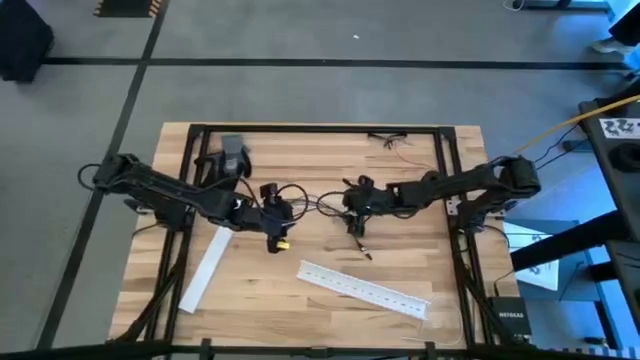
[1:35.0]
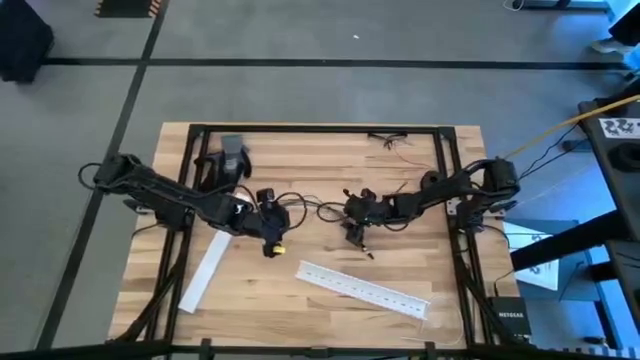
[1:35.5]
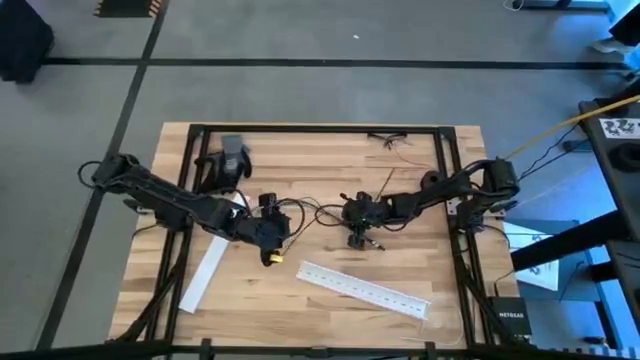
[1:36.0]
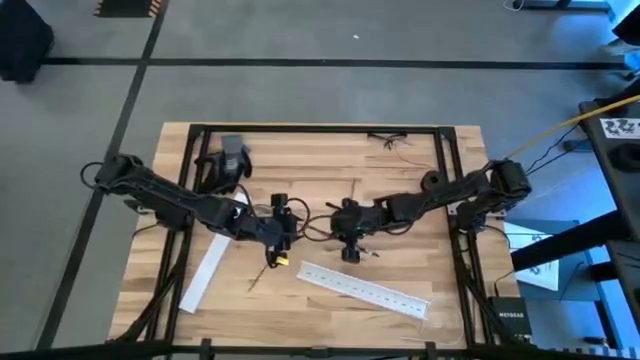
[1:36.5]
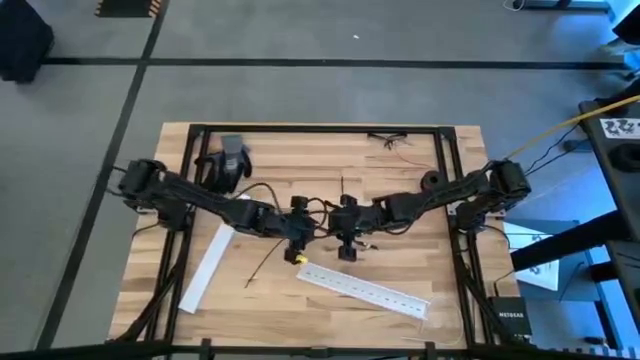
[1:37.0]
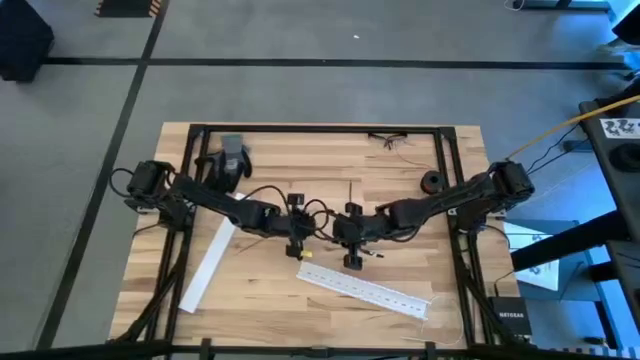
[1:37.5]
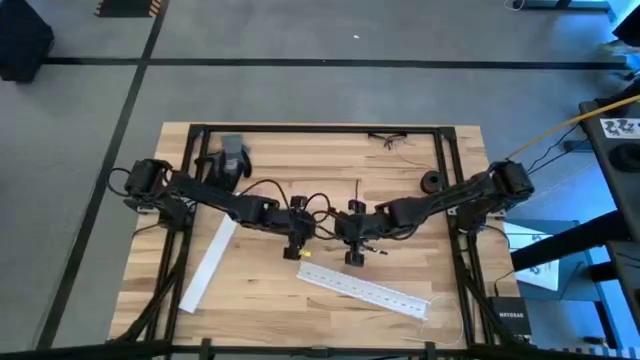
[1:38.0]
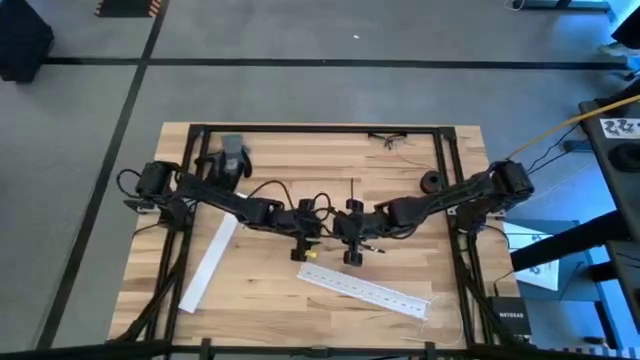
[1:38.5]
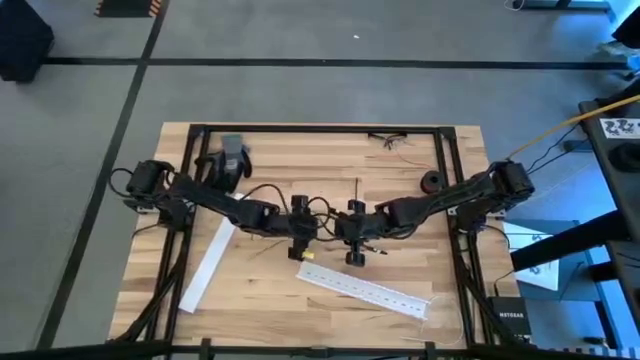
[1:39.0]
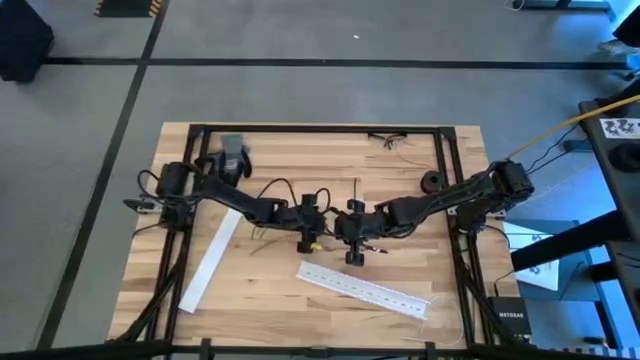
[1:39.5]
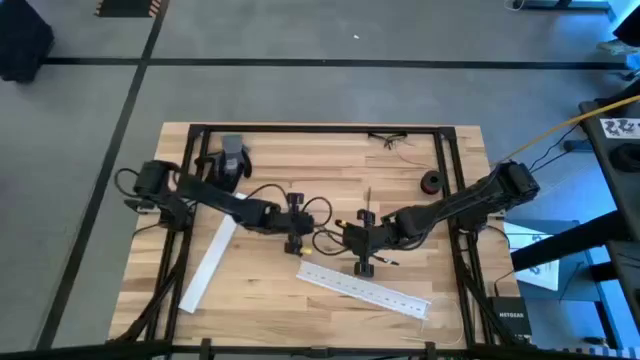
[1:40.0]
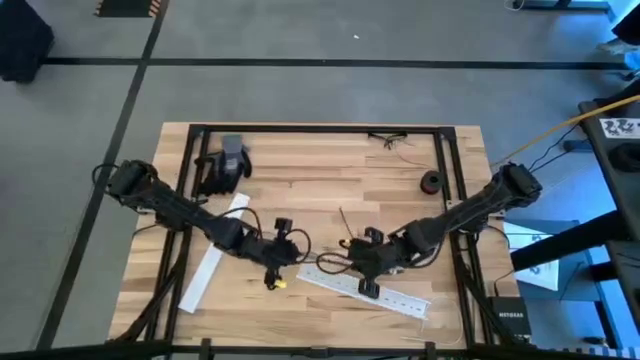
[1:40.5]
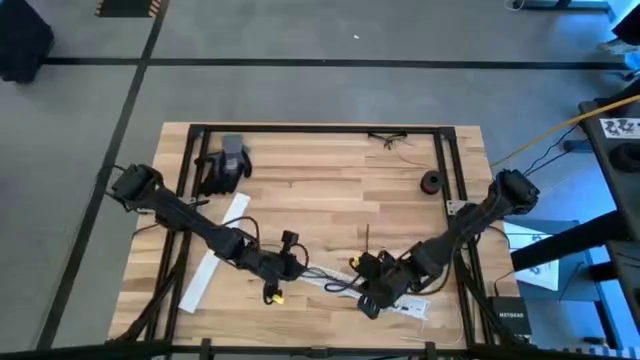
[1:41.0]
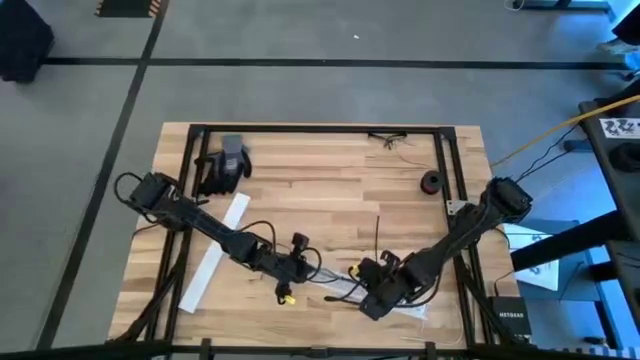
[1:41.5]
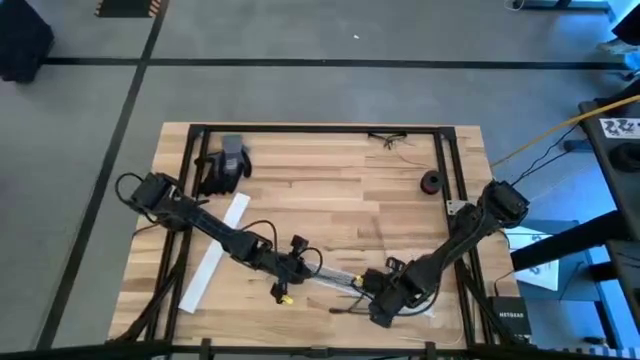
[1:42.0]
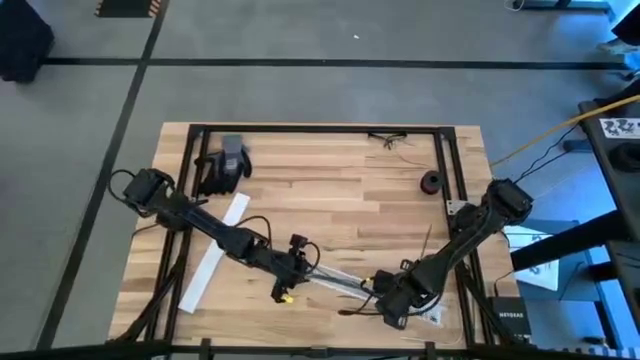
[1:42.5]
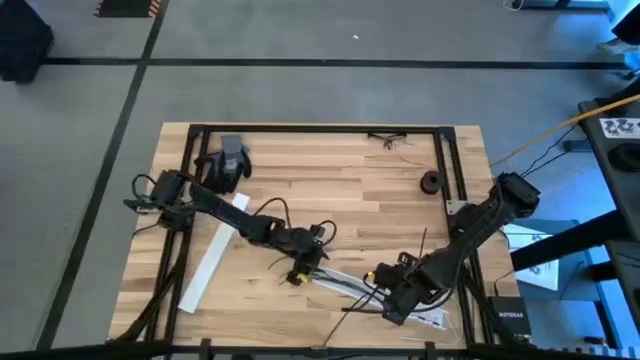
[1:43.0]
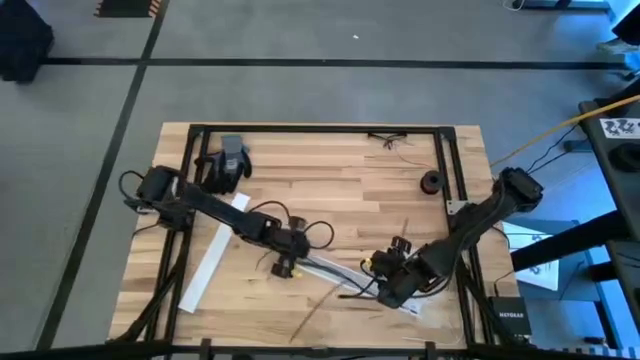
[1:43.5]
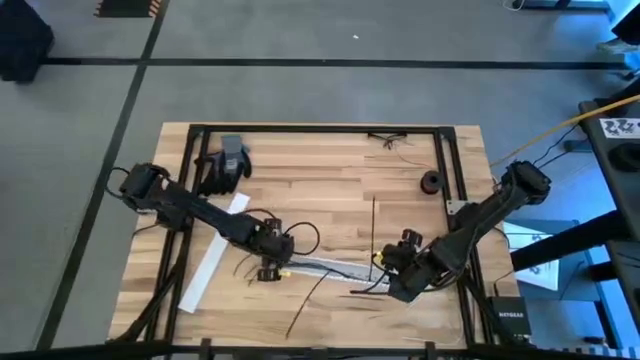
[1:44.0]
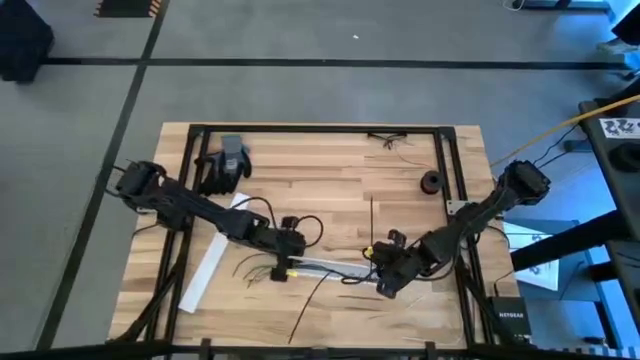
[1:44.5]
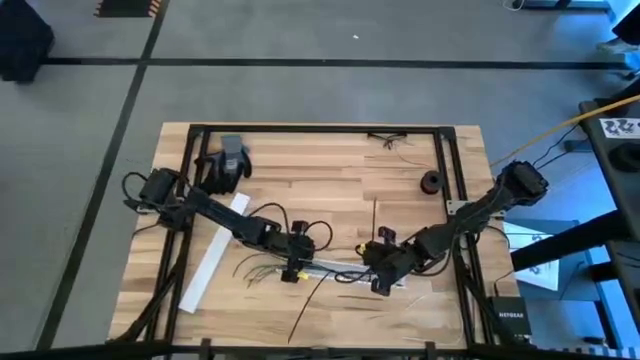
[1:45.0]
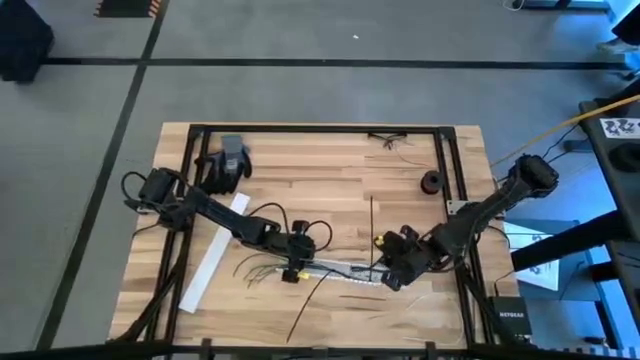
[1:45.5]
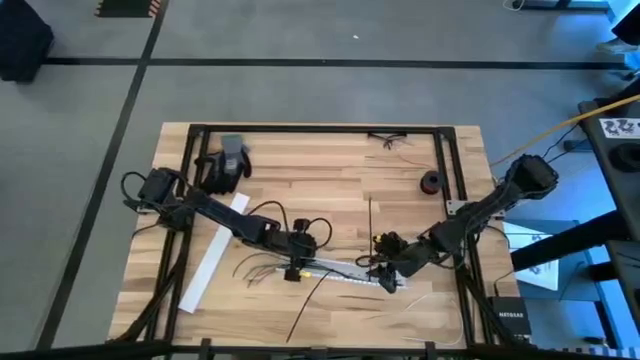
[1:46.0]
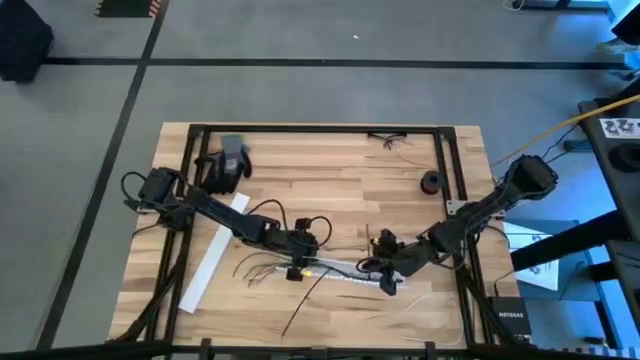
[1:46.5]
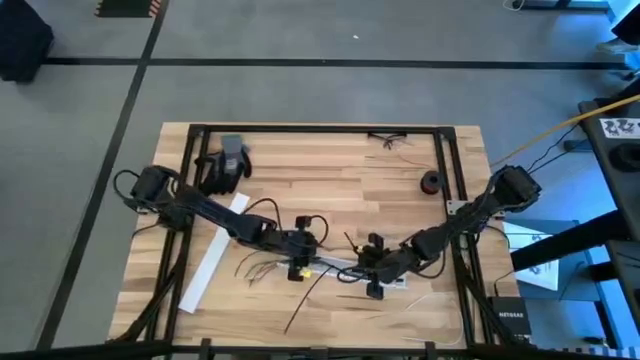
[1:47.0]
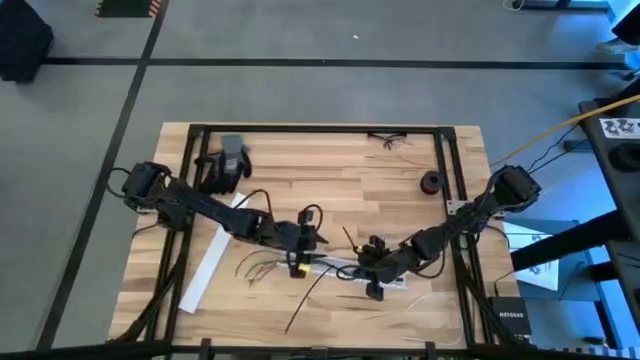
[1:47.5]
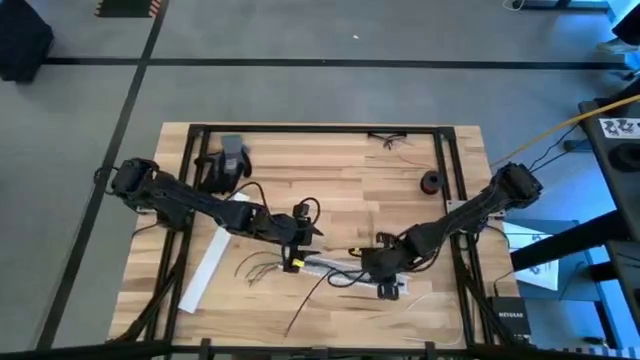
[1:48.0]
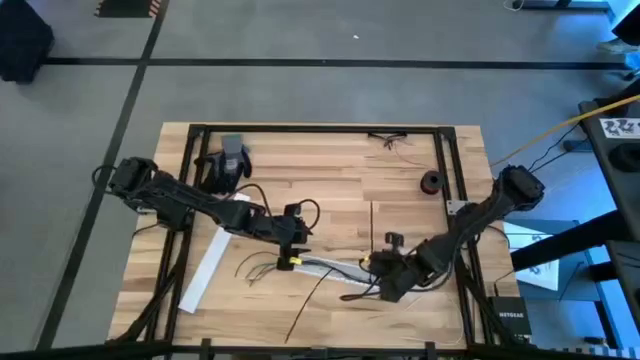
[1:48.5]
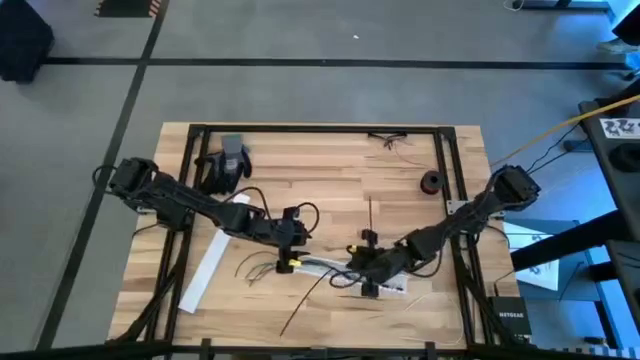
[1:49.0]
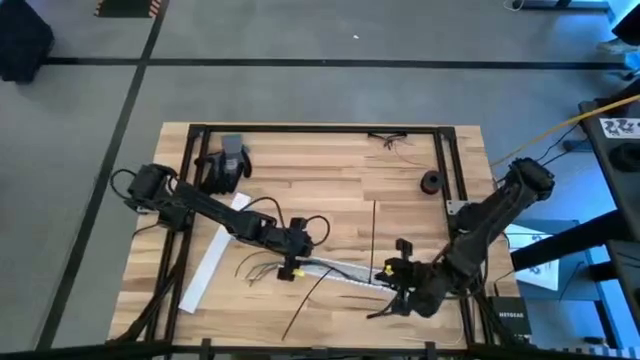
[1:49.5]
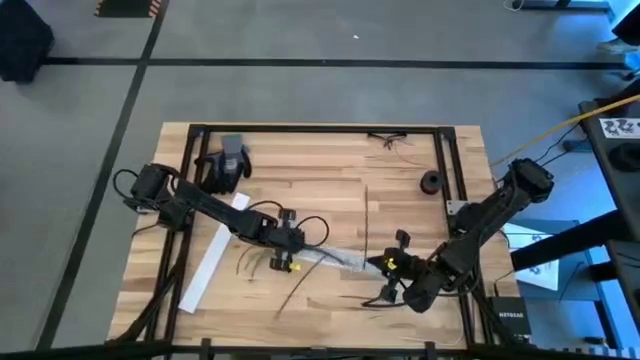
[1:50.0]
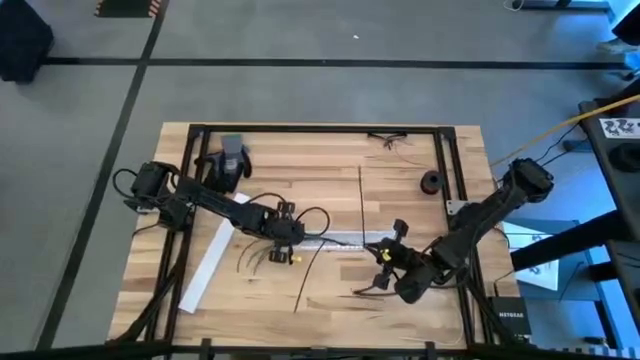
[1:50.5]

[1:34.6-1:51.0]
Task: Ziptie cables
Put the zip-tied cables into the cable duct

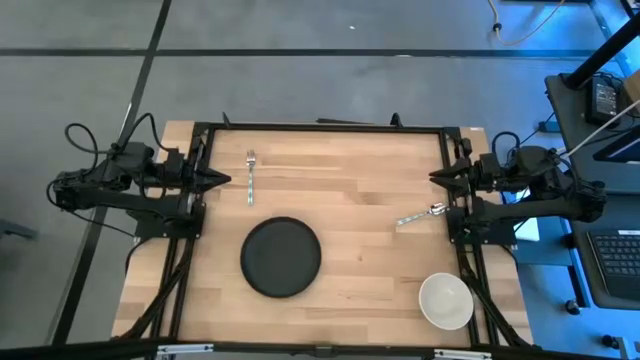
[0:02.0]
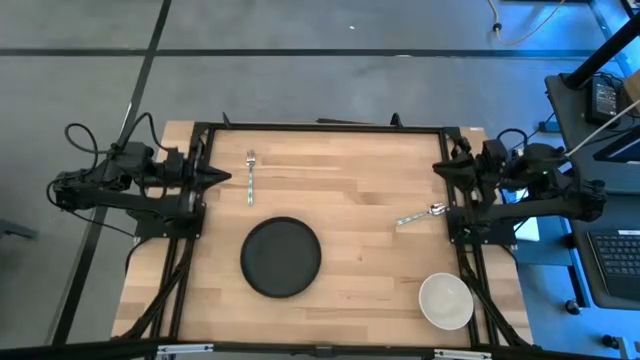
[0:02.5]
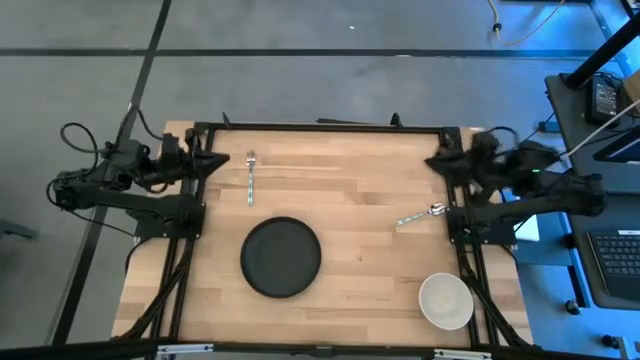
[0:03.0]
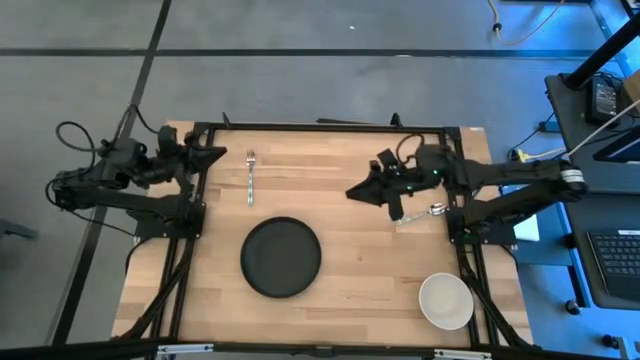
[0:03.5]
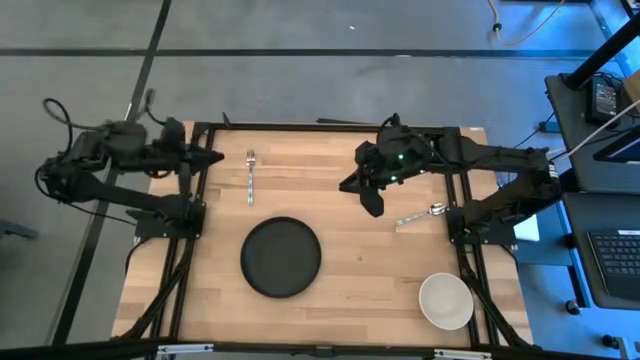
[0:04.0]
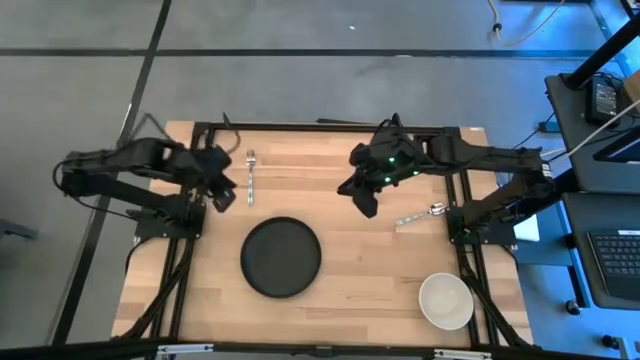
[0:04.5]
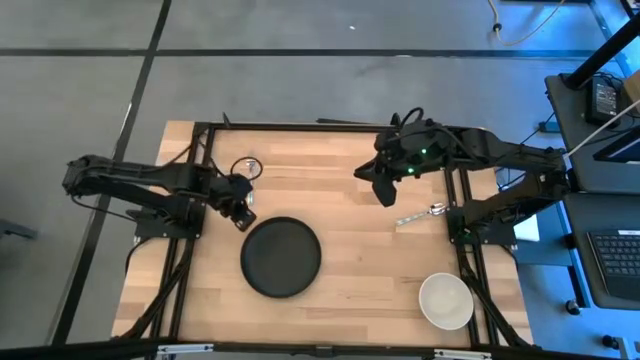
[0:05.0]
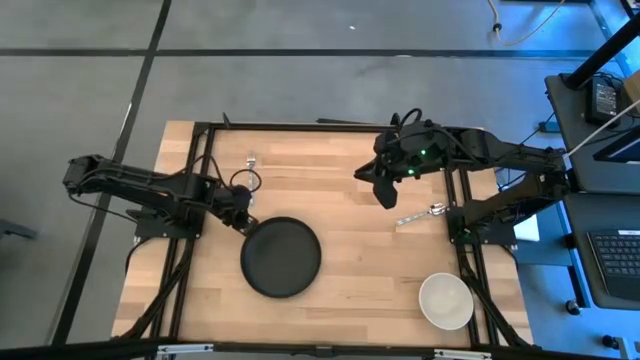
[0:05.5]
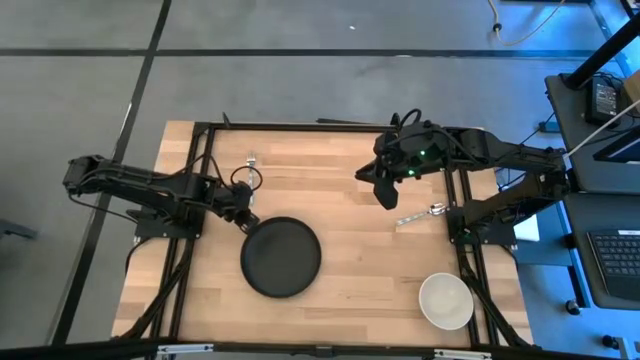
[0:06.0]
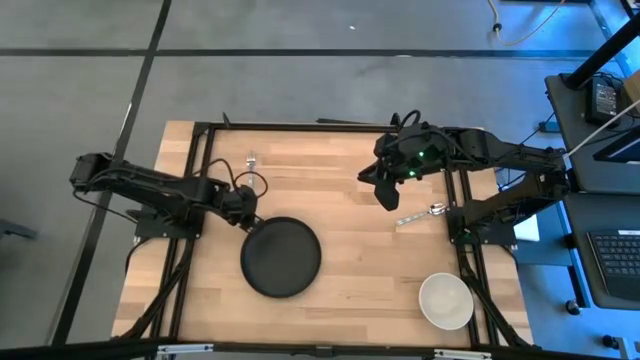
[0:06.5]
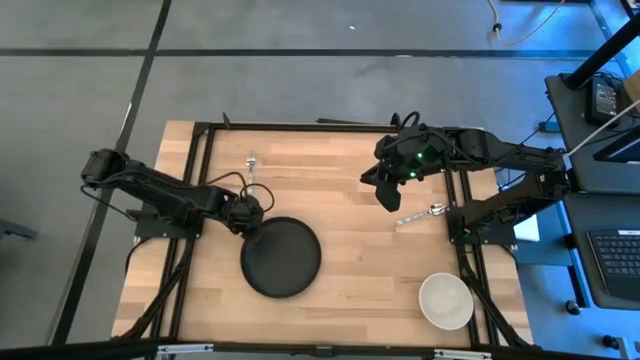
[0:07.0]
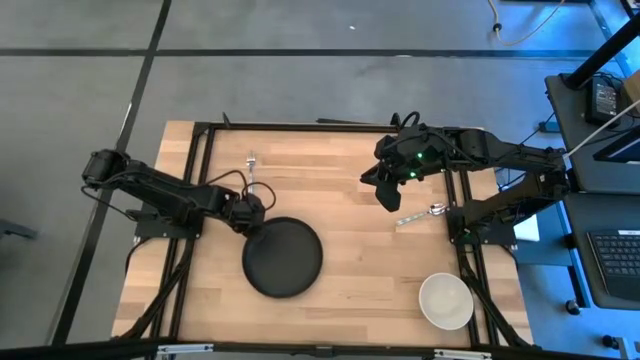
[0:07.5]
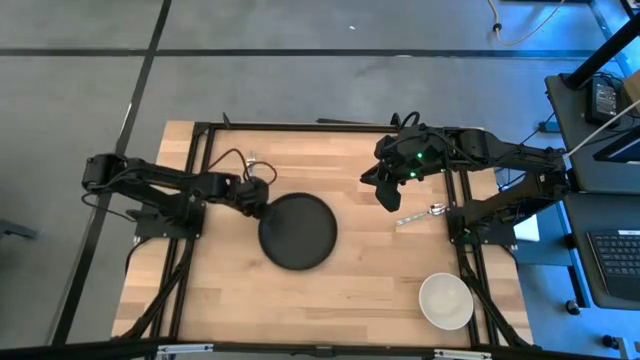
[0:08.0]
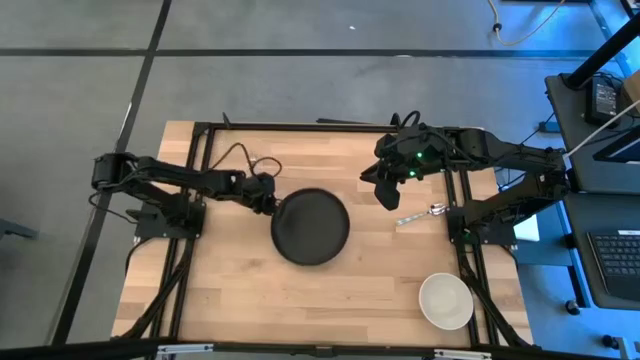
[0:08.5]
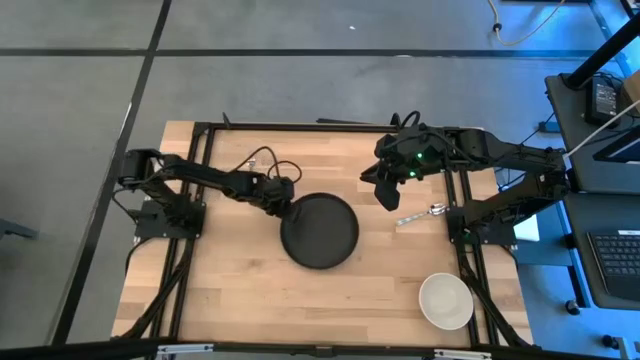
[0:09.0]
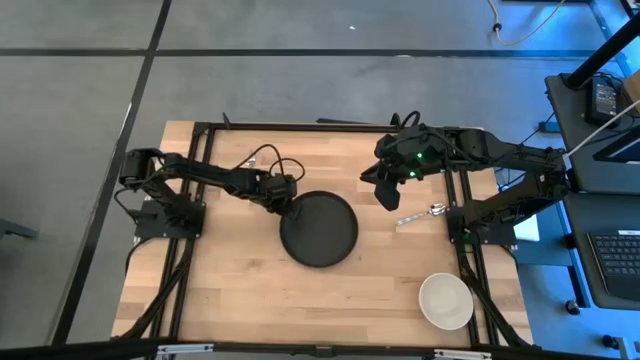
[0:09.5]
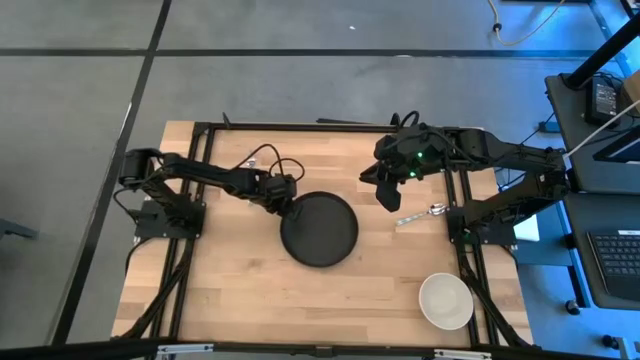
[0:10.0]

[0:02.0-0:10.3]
Task: Pick and place plate/cup/fork/spoon on tray
Prepare the black plate
